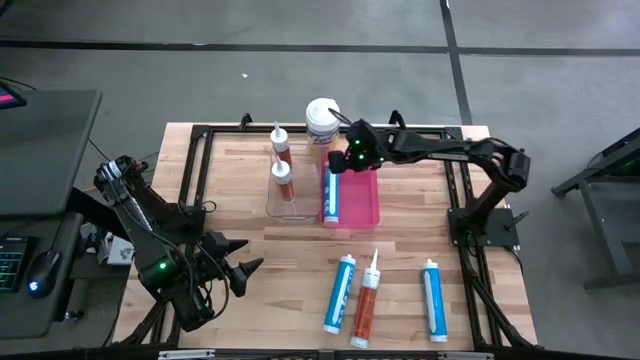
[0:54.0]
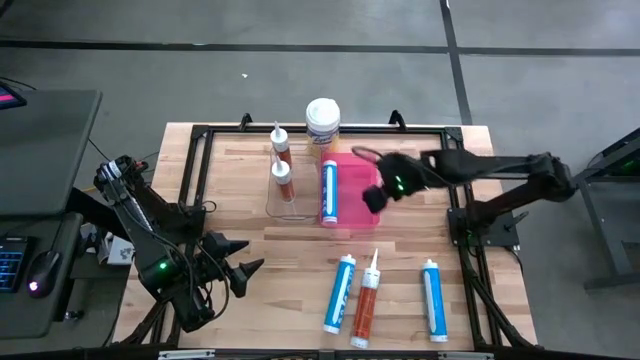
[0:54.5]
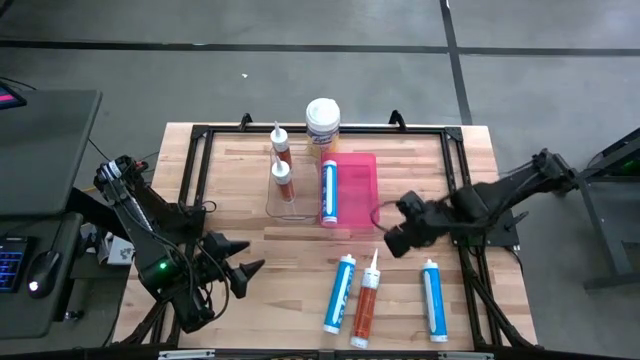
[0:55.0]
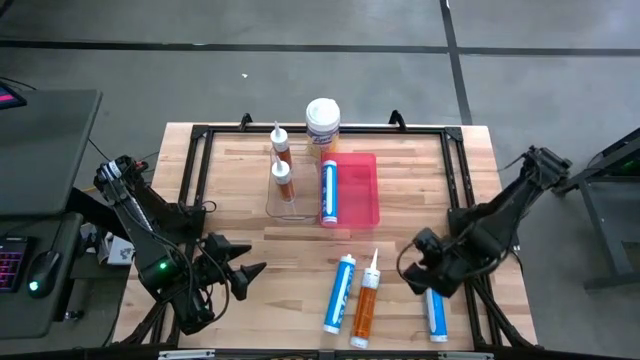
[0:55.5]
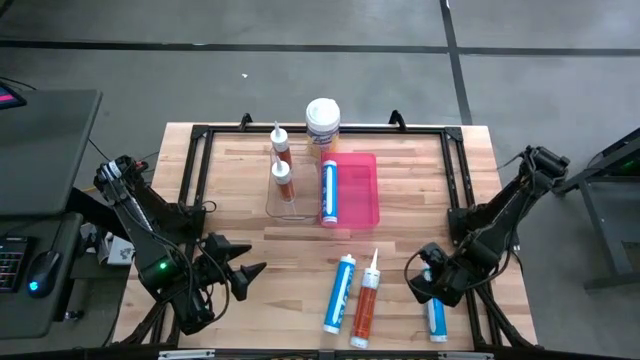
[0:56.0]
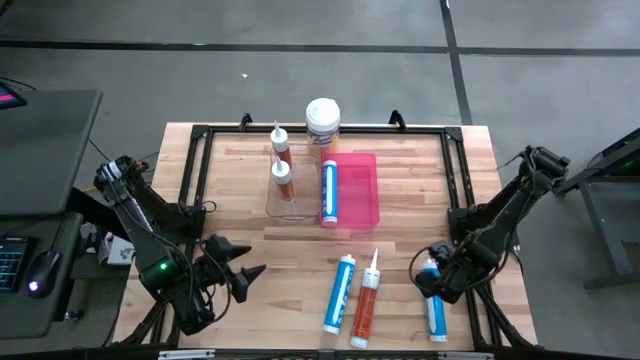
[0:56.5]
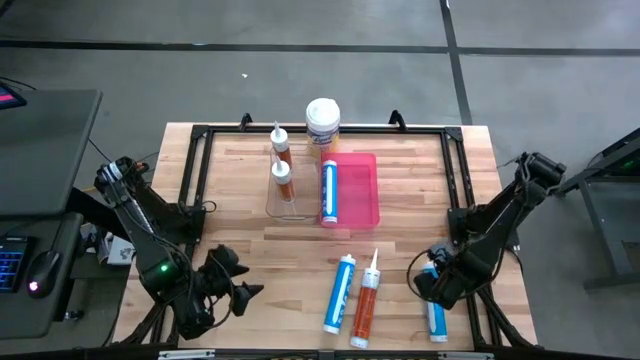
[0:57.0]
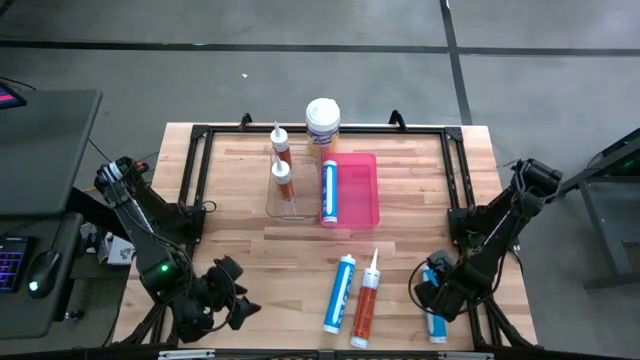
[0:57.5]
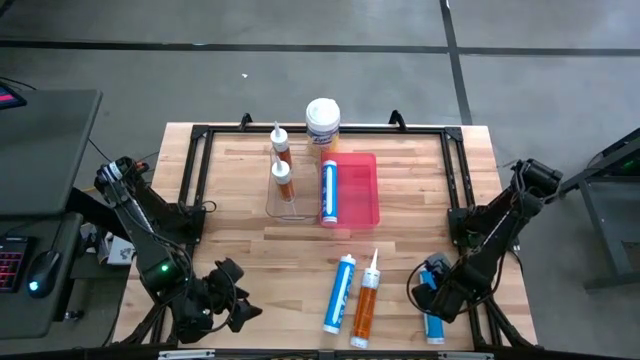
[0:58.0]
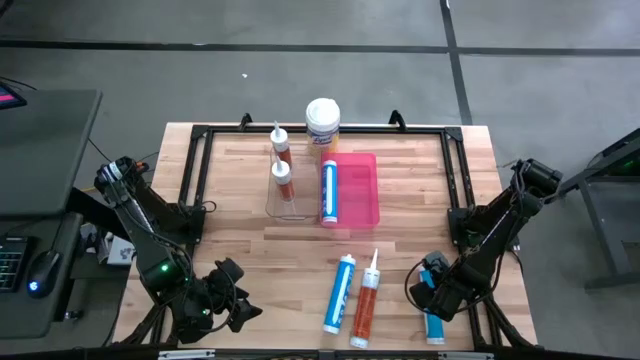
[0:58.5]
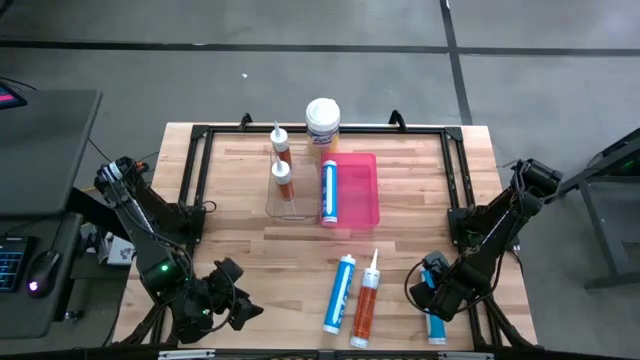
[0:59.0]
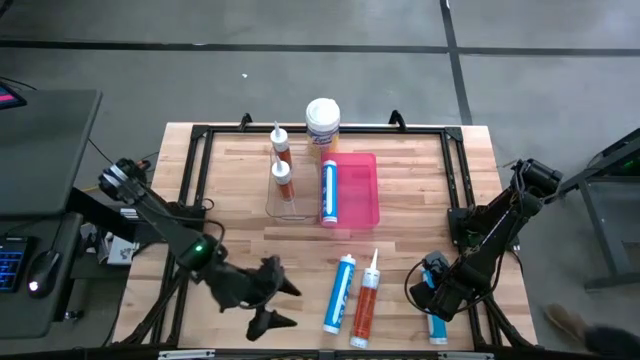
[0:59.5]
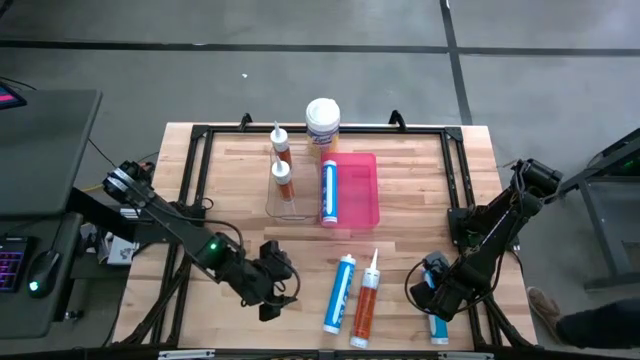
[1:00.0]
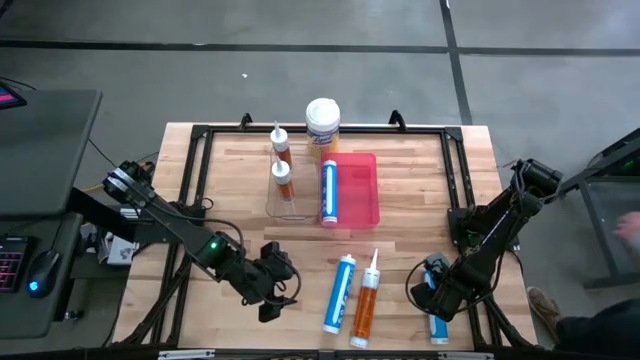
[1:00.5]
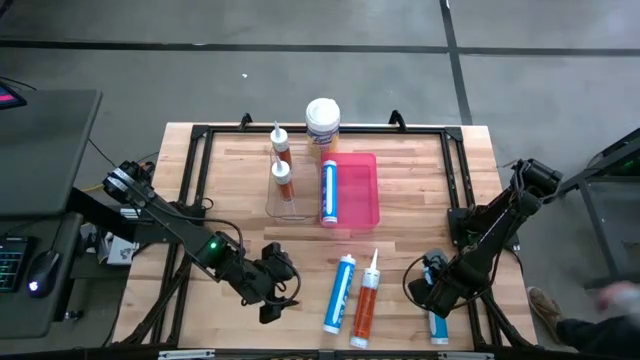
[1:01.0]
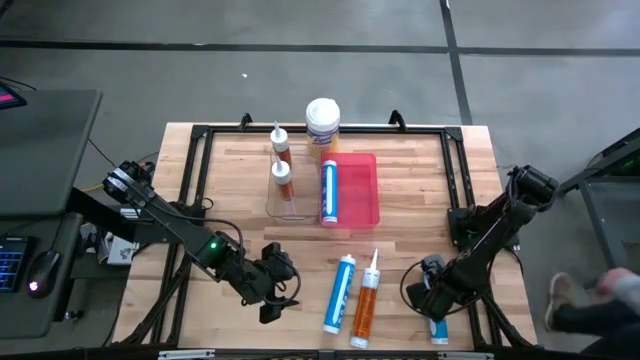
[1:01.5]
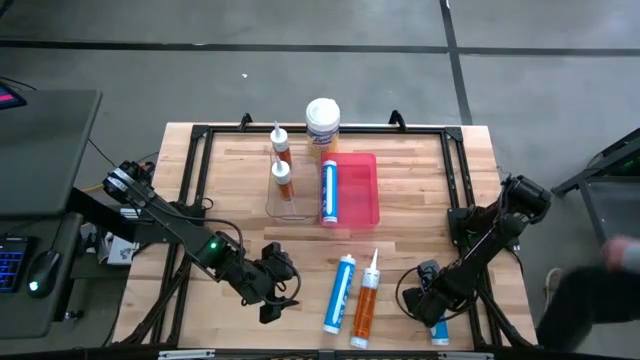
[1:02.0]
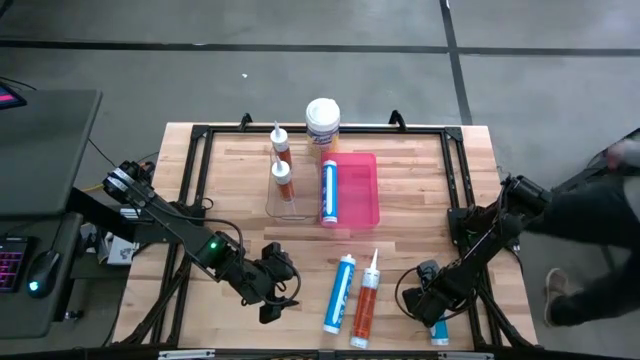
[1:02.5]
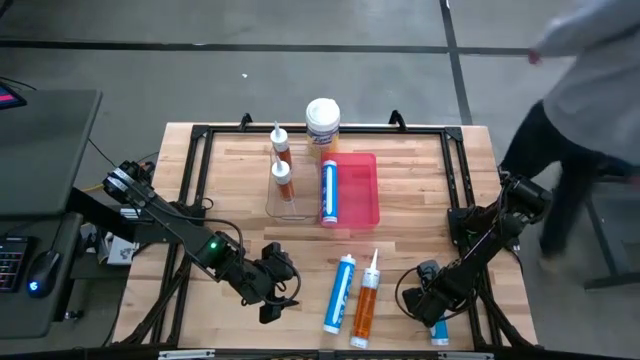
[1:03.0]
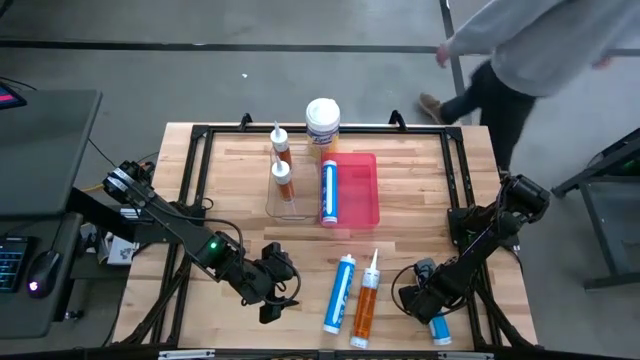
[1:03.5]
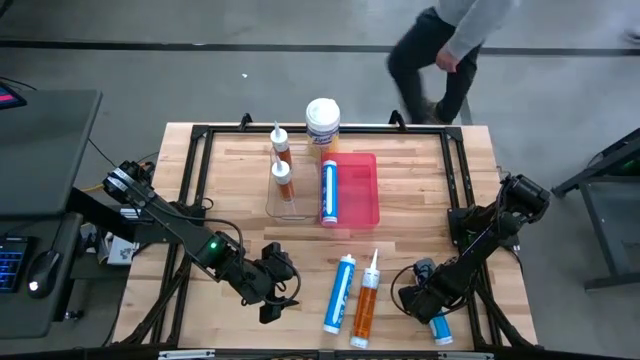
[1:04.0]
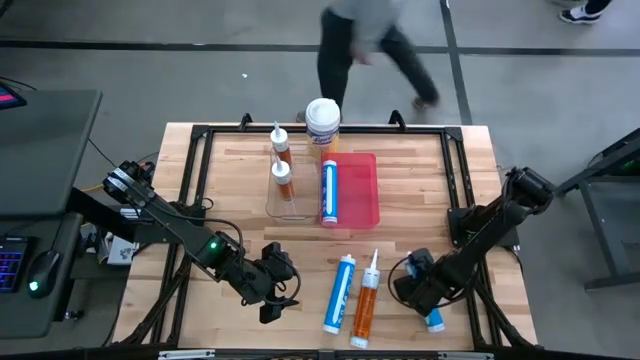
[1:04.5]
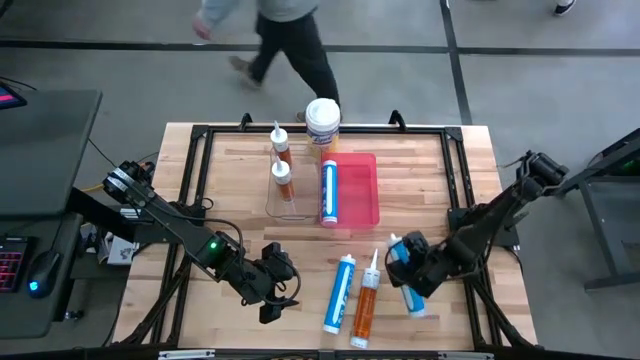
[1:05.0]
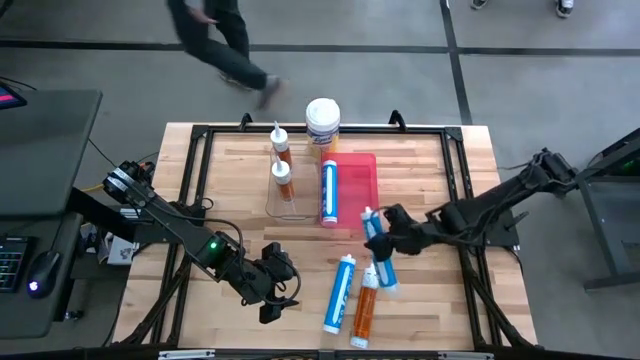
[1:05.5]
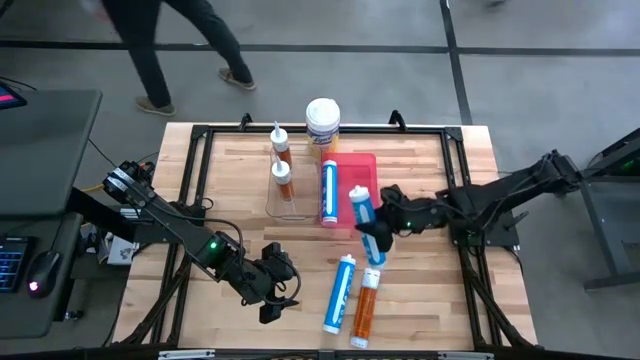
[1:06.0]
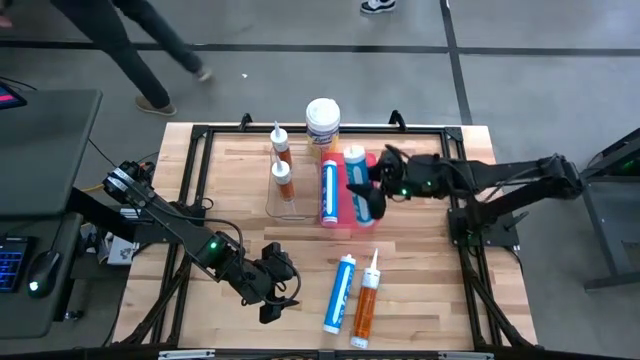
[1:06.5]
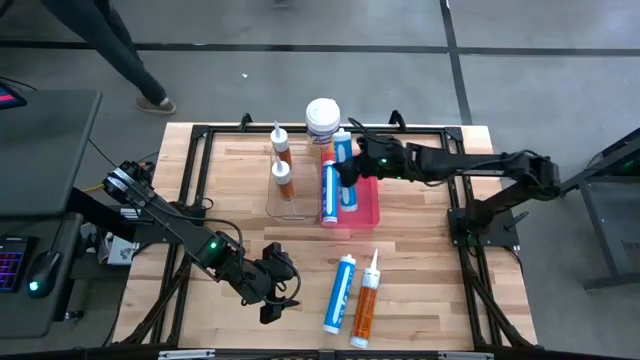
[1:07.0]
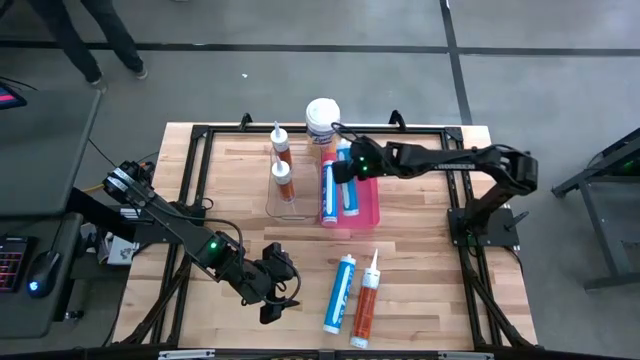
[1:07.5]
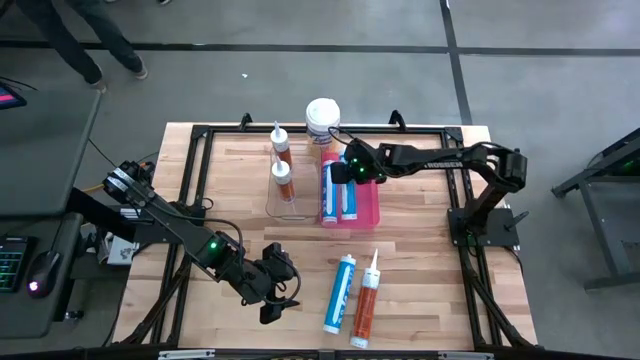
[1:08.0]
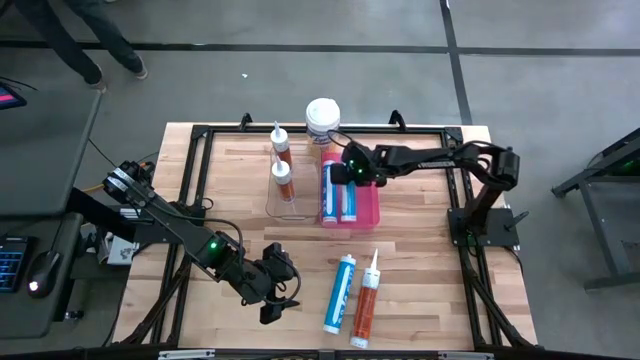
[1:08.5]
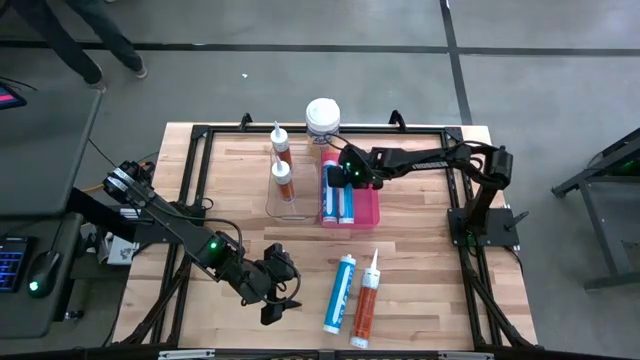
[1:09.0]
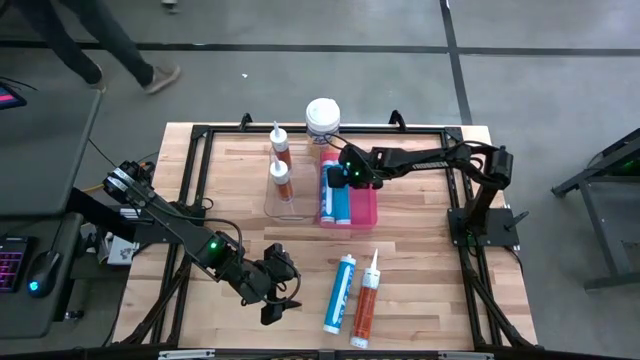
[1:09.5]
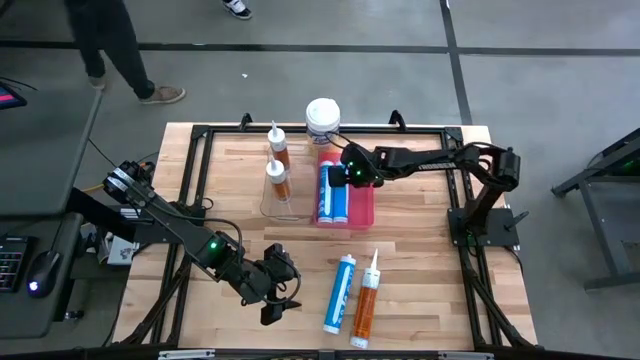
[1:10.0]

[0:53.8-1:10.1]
Task: Pick & place silicon tubes, Sealant and Lysol wipes
Put the right blue sealant into the pink container

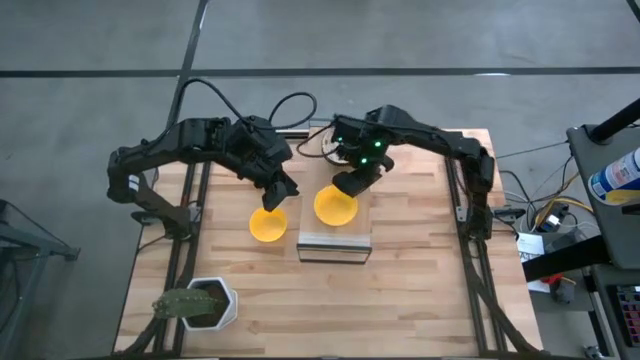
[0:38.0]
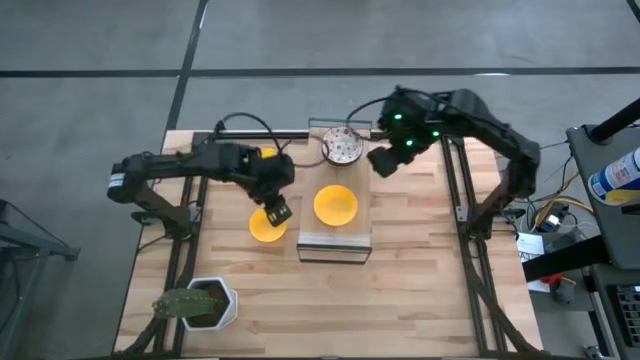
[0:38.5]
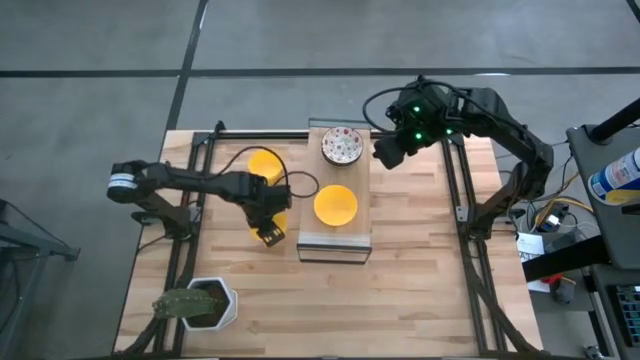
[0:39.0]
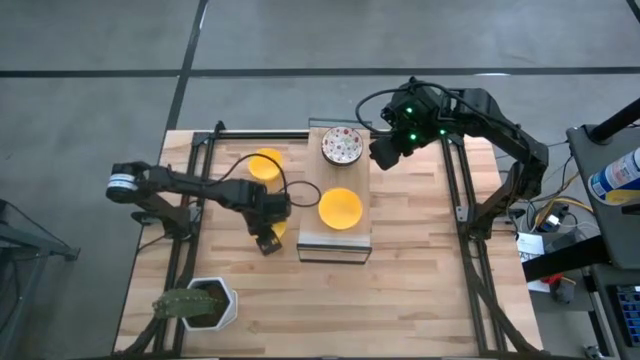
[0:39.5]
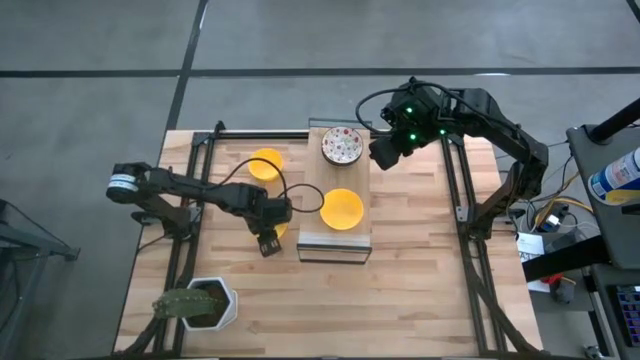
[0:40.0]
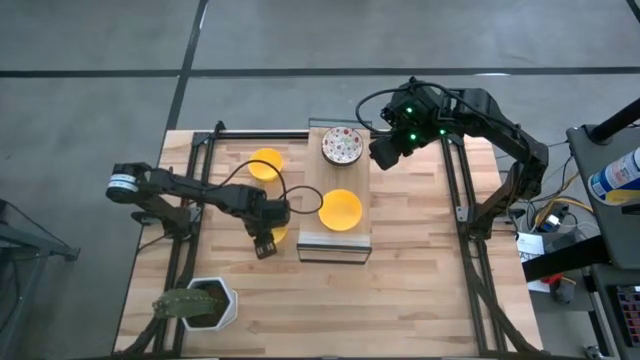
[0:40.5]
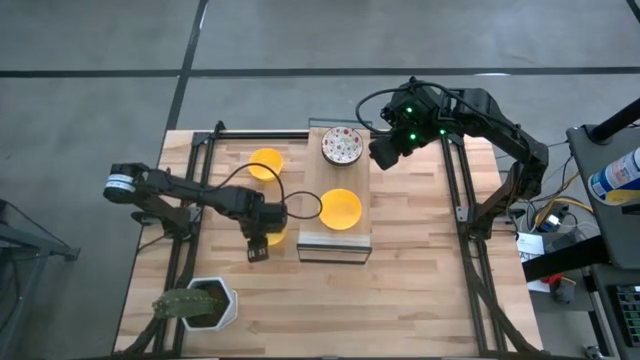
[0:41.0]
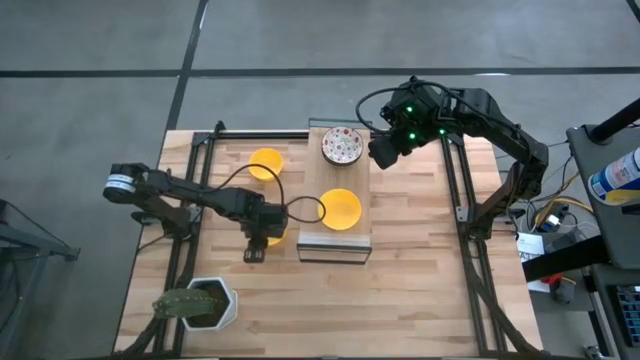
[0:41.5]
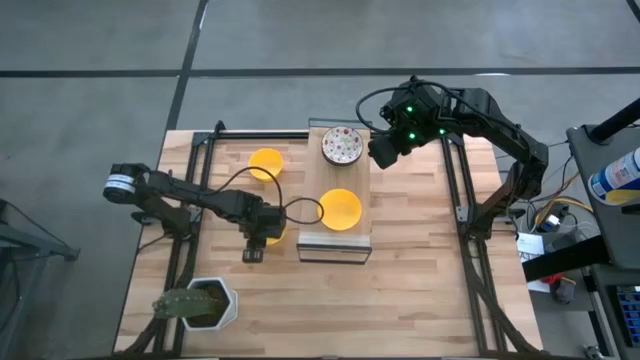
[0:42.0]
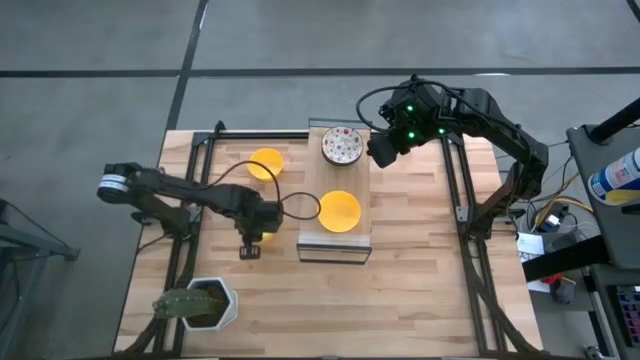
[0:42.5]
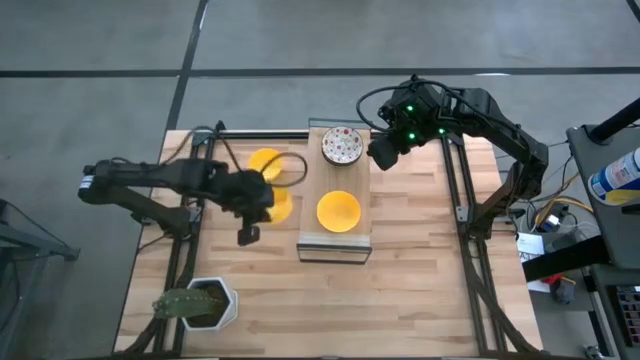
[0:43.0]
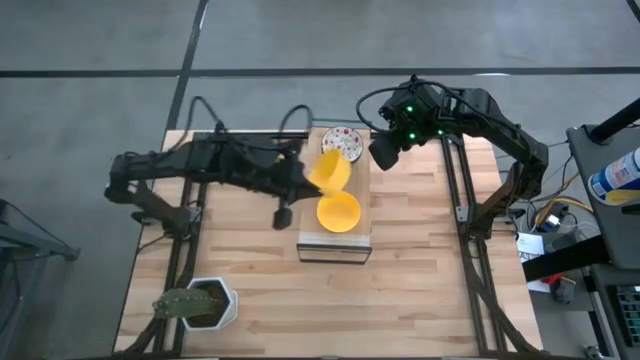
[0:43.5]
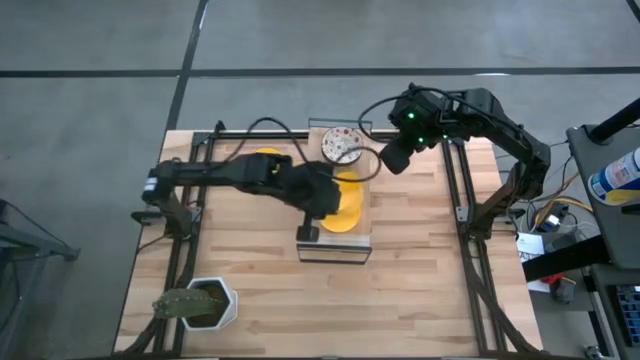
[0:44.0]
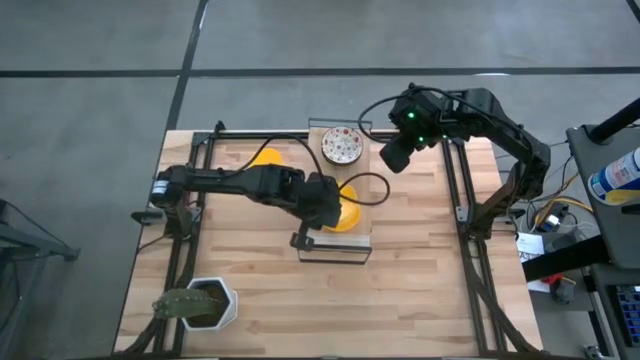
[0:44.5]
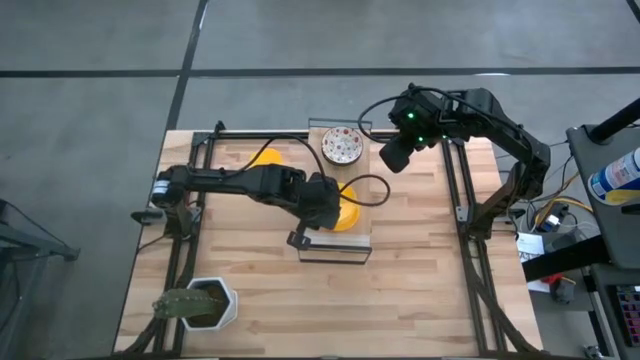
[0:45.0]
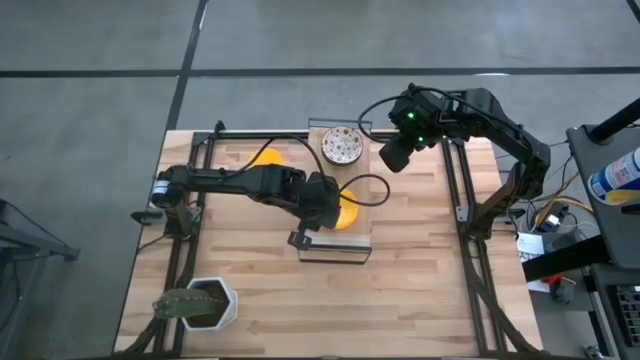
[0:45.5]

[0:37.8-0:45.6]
Task: Pick & Place Mini bowls
Stack the bottom yellow bowl on the yellow bowl on the shelf
